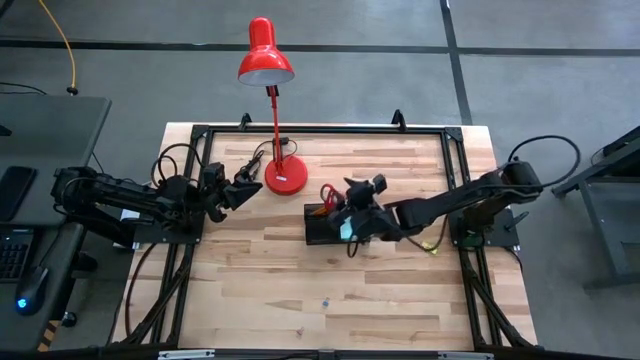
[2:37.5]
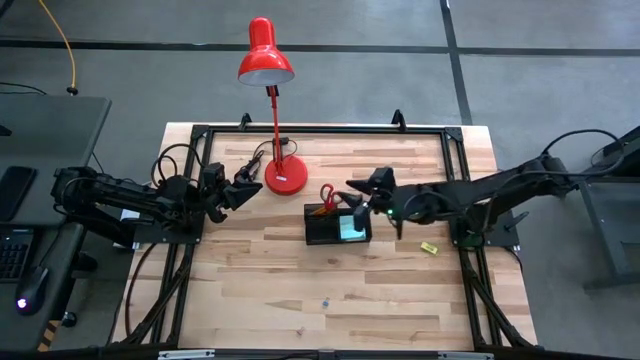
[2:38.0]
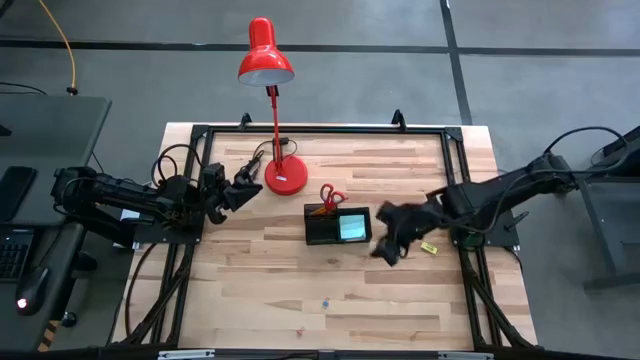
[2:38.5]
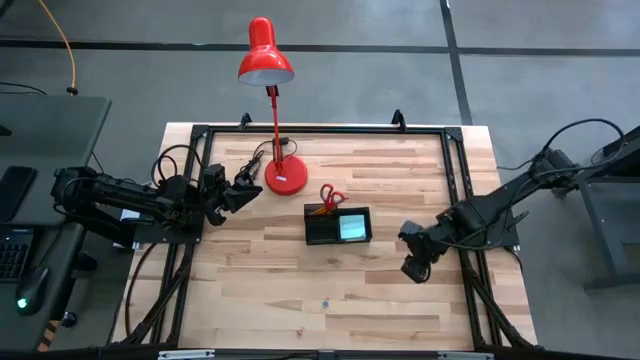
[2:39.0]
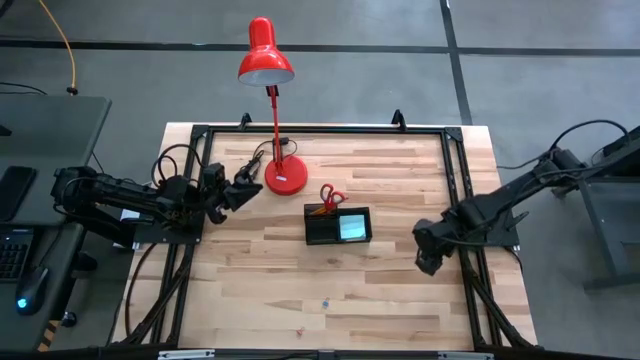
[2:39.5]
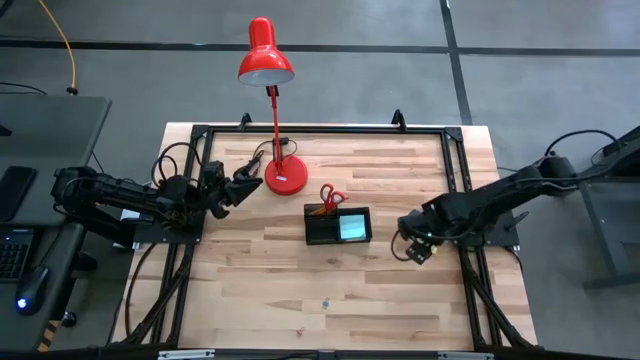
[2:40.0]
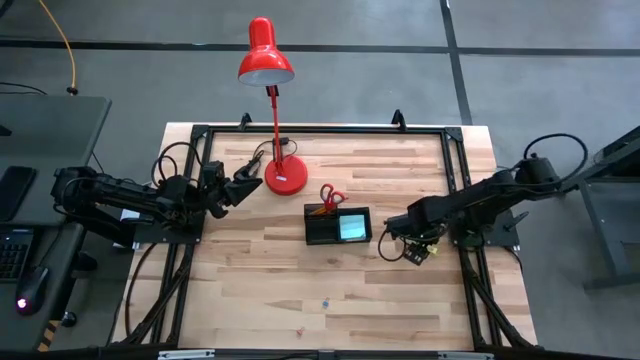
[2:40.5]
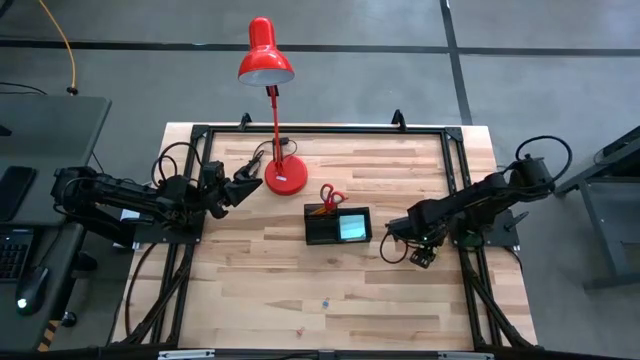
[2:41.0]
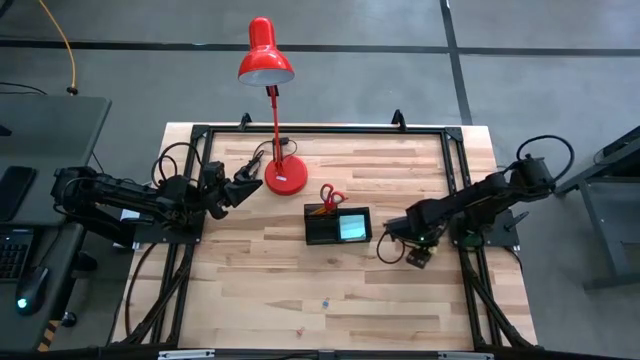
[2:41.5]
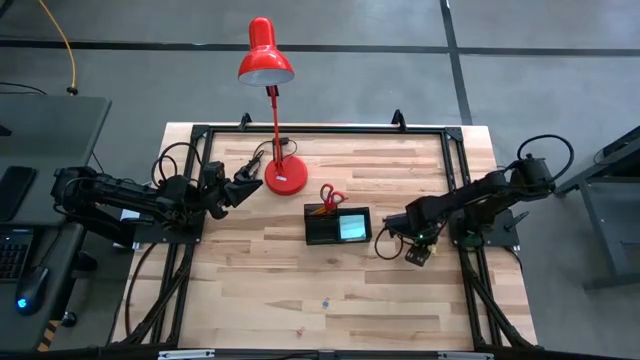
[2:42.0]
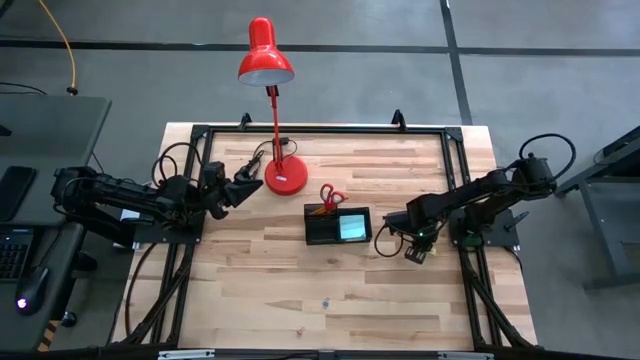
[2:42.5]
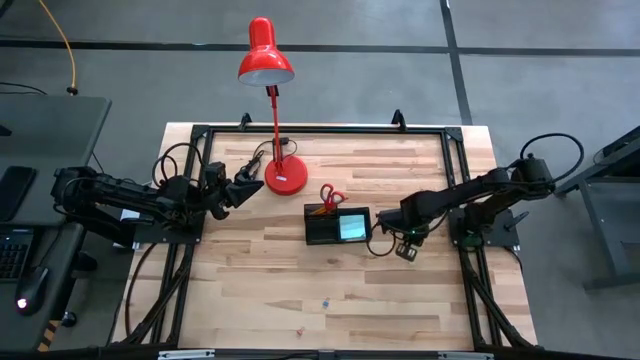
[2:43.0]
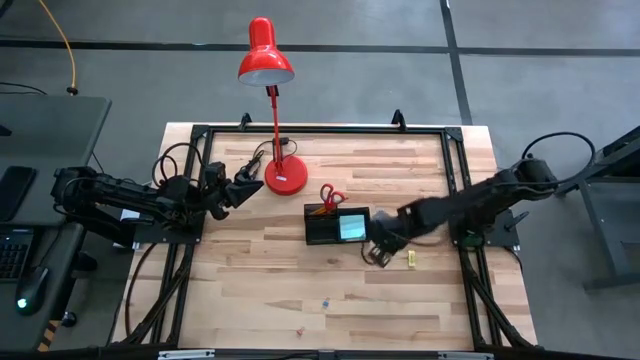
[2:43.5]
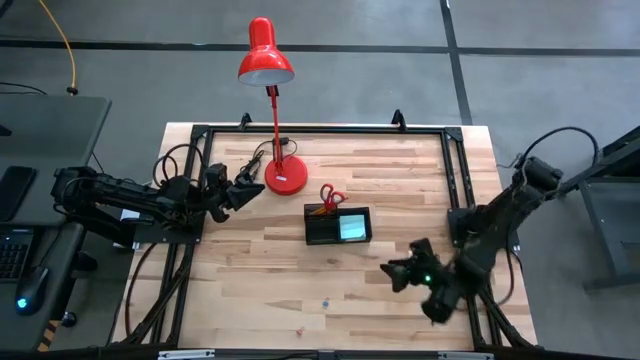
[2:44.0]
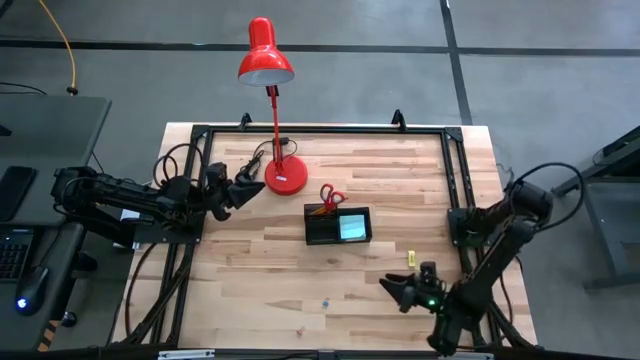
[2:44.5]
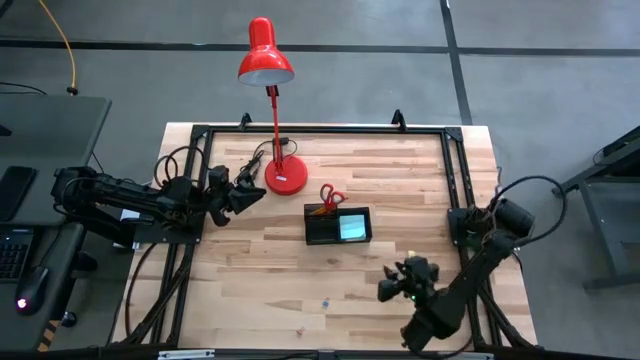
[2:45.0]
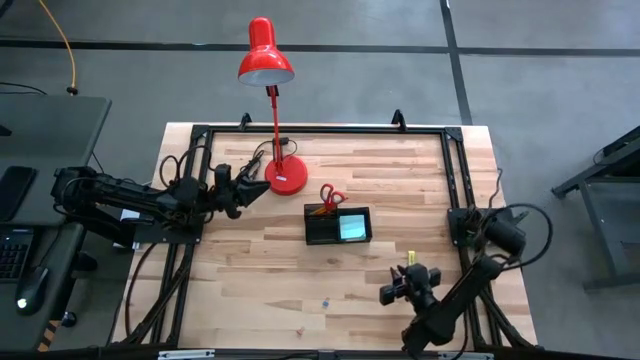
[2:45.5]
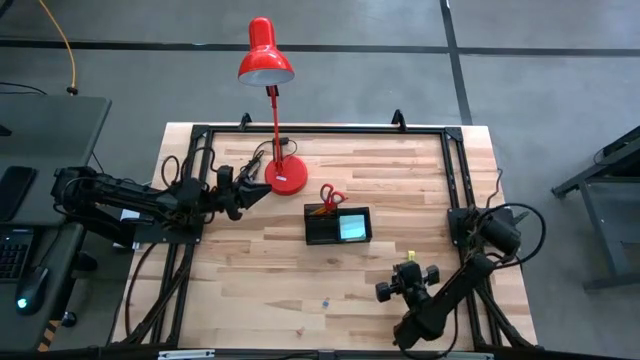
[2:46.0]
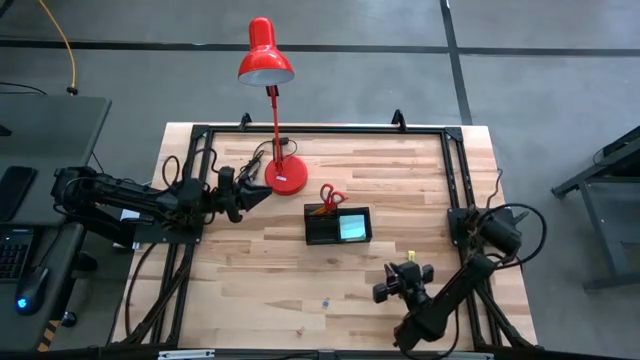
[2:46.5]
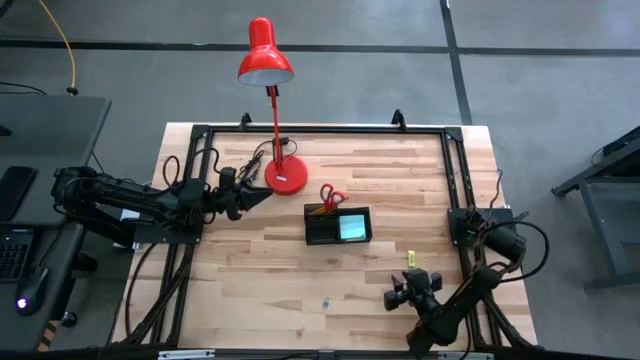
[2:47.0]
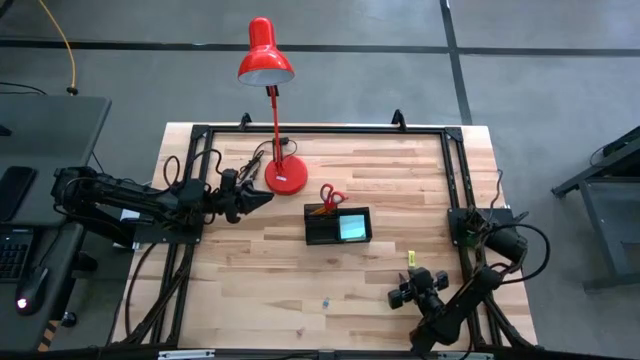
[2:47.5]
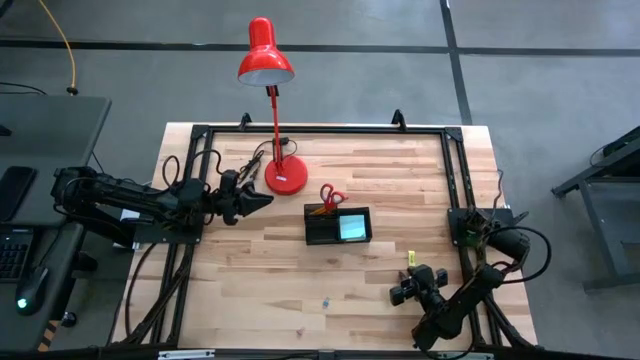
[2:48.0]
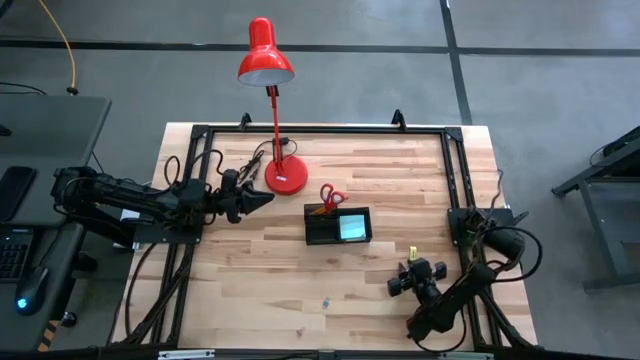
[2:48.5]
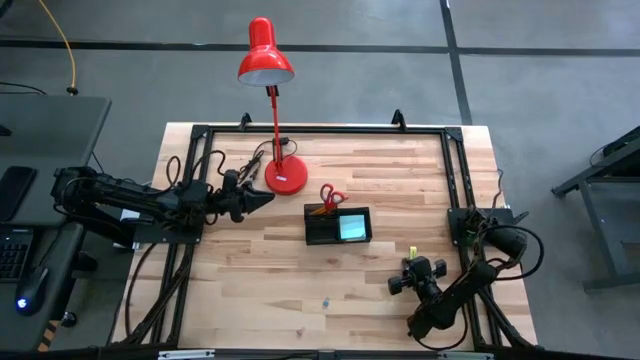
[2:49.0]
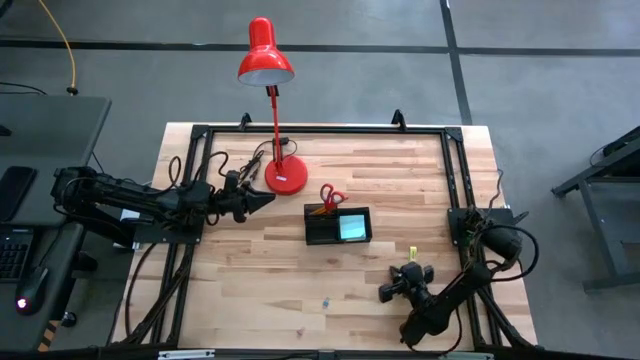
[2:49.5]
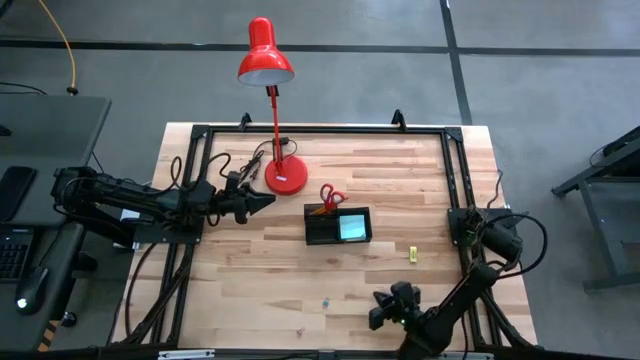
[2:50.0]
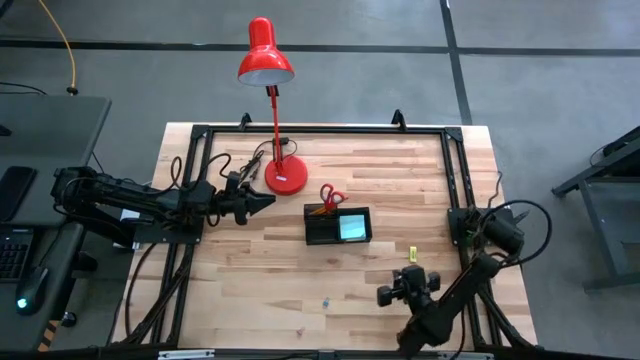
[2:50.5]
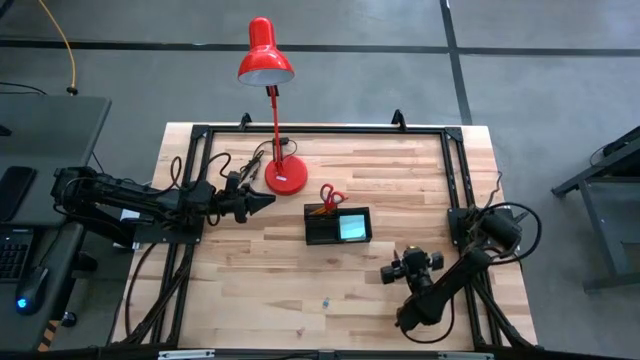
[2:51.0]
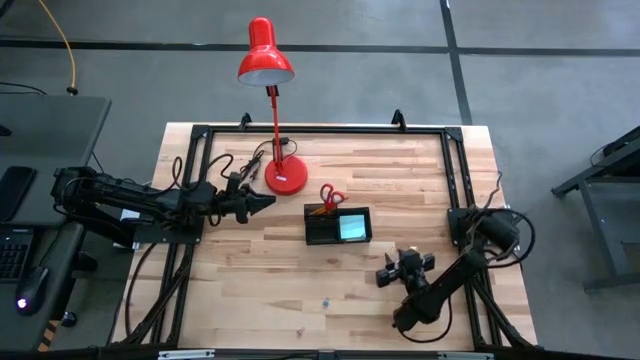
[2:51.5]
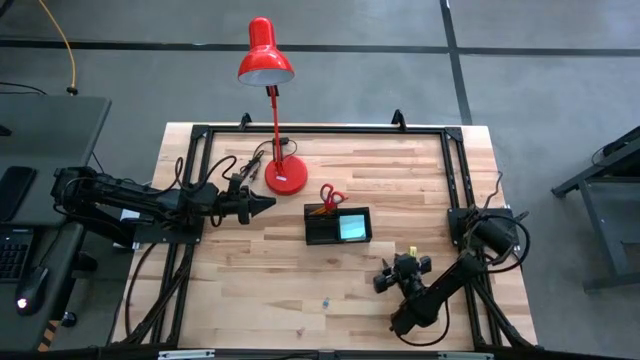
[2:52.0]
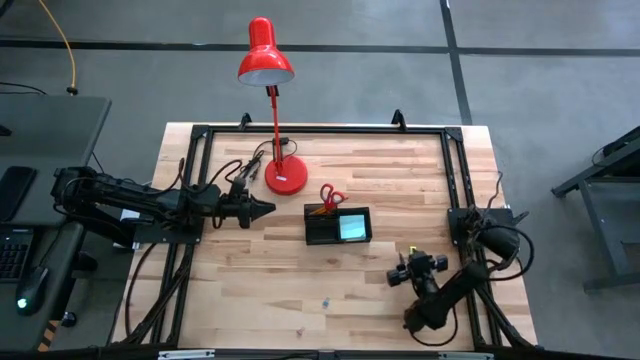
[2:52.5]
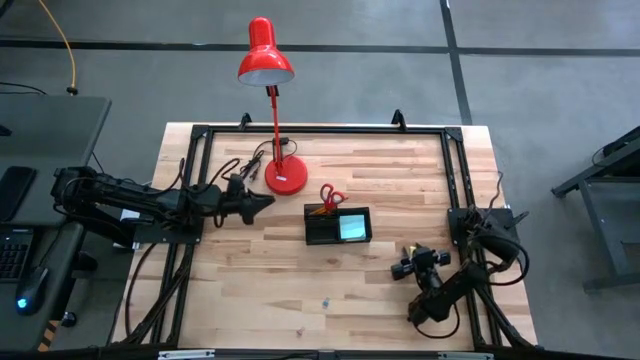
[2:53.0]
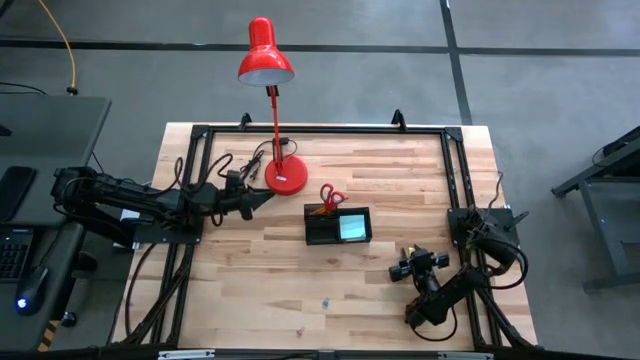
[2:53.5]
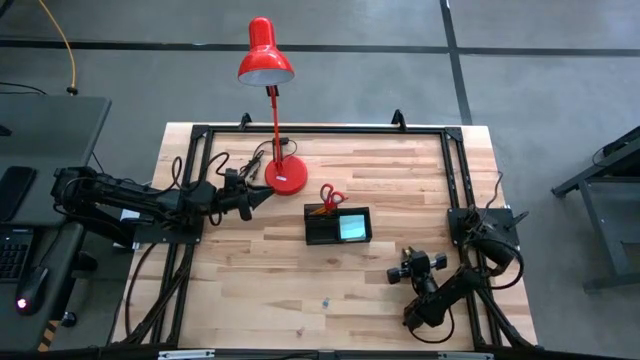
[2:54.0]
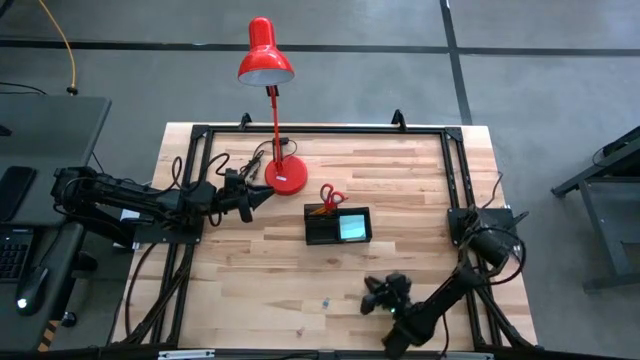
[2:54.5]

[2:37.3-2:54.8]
Task: Pick and place office supplies into organizer
Put the yellow eraser into the black desk organizer

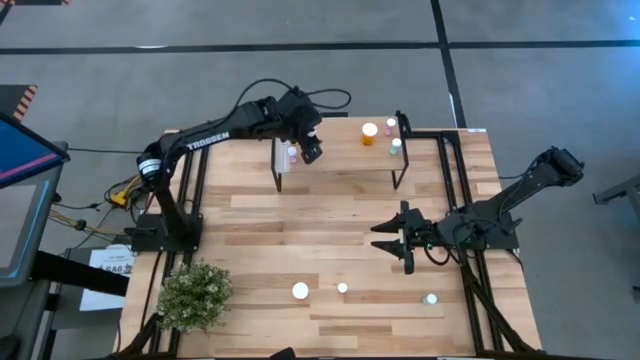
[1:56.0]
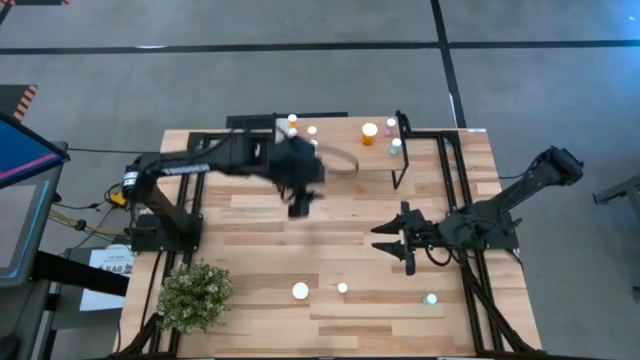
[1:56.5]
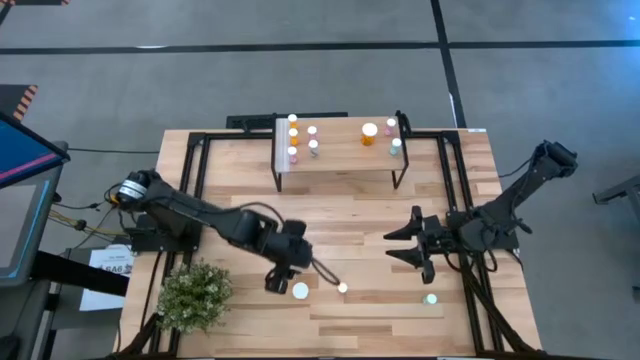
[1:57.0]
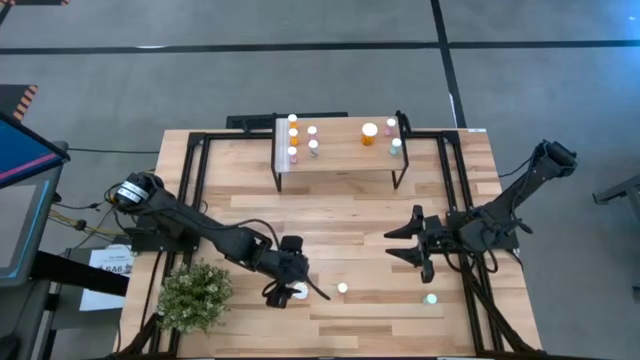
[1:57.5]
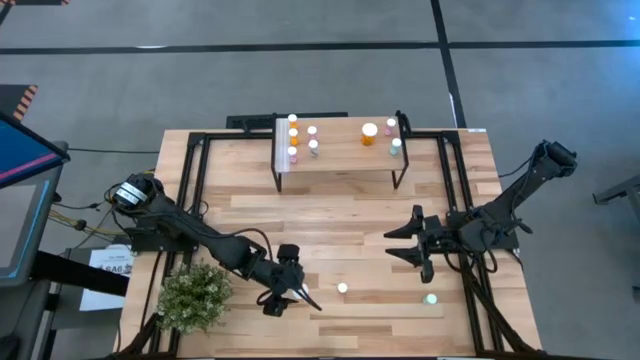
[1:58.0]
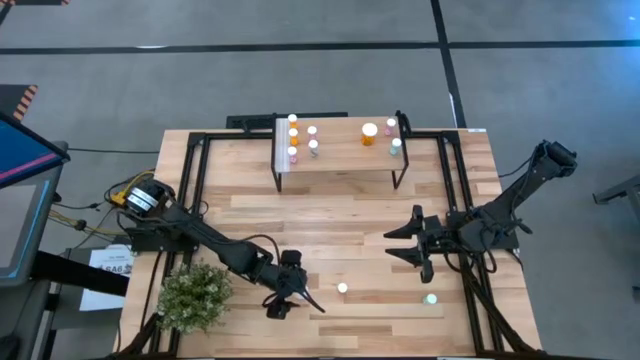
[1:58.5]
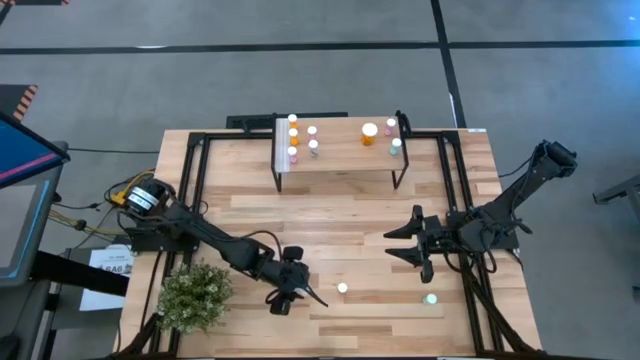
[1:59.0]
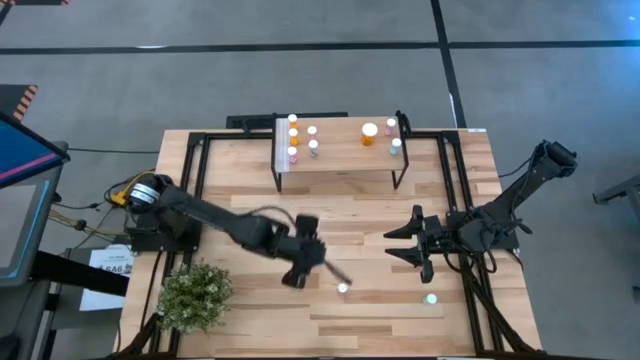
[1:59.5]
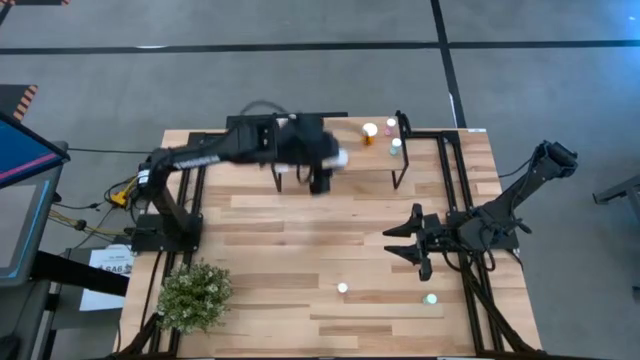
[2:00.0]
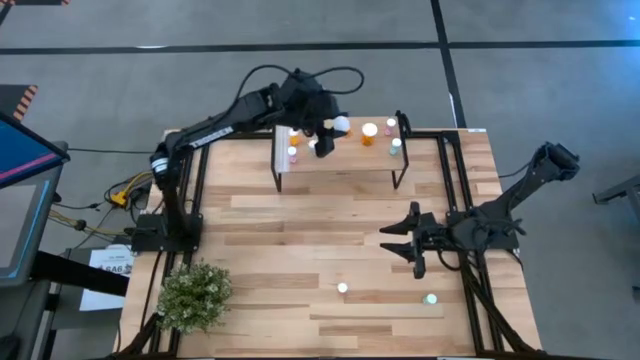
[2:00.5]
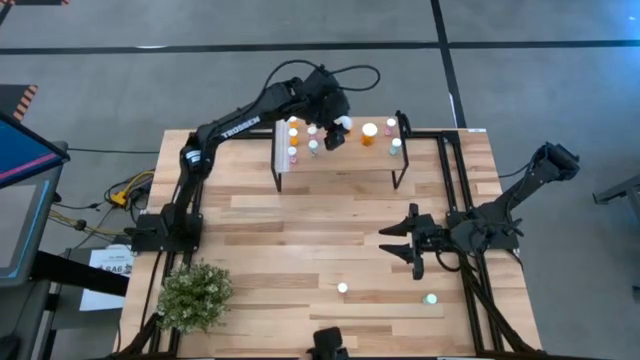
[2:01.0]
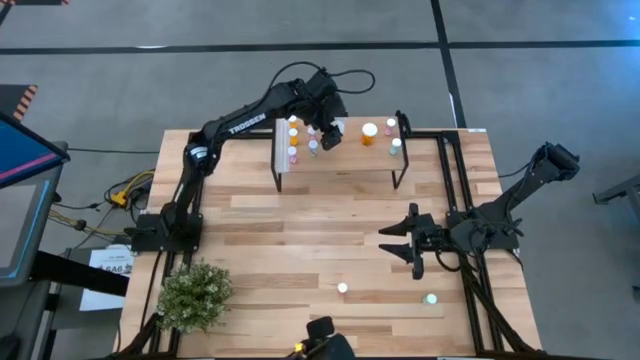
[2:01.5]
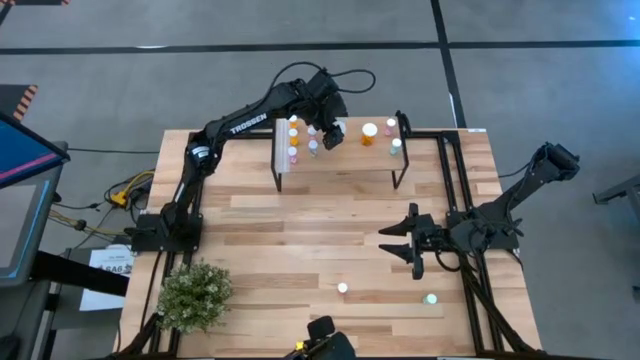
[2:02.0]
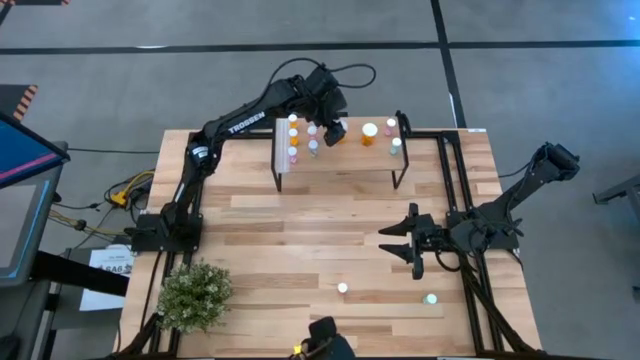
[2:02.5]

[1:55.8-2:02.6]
Task: Pick and place medicine bottles onto shelf by color
Put the large orange pill bottle on the shelf
